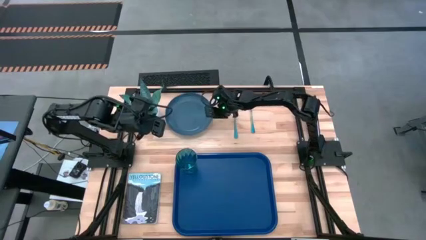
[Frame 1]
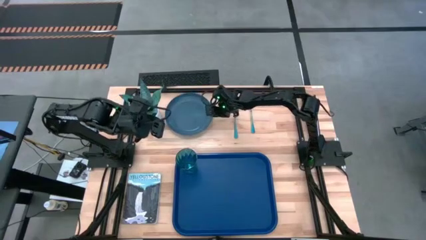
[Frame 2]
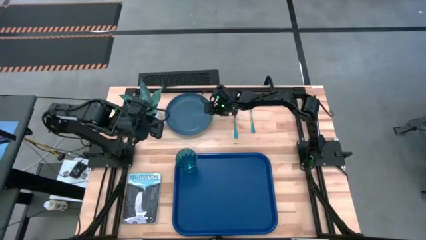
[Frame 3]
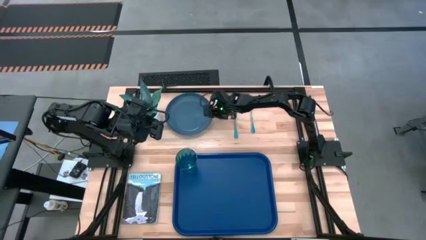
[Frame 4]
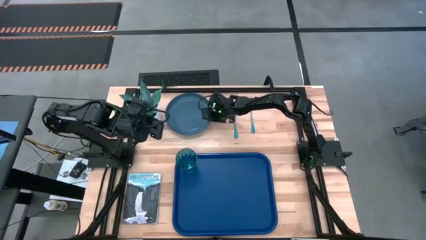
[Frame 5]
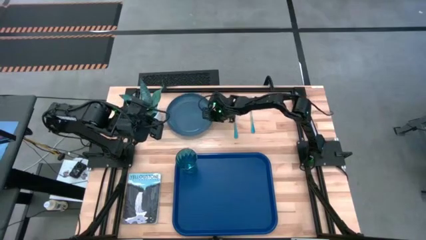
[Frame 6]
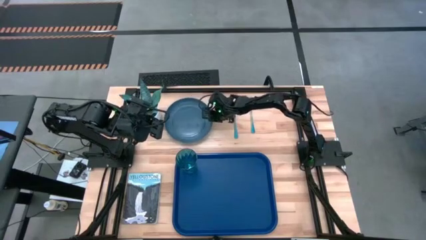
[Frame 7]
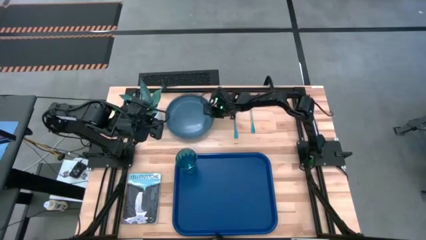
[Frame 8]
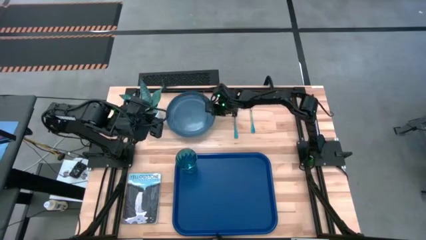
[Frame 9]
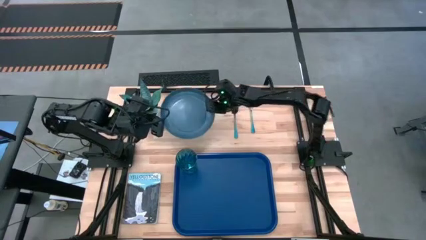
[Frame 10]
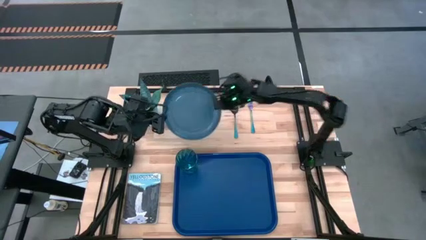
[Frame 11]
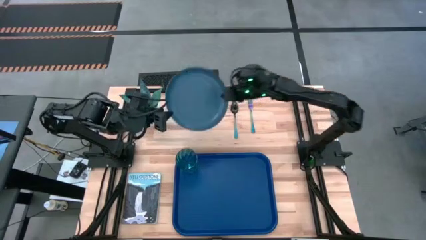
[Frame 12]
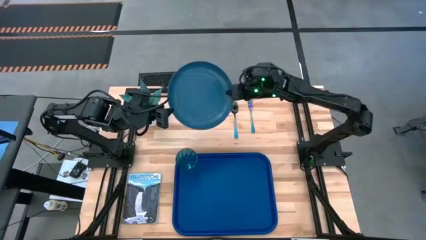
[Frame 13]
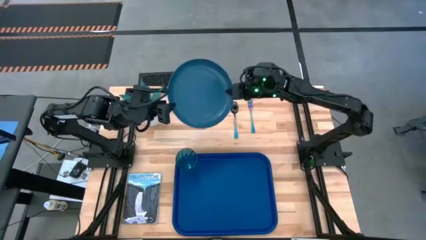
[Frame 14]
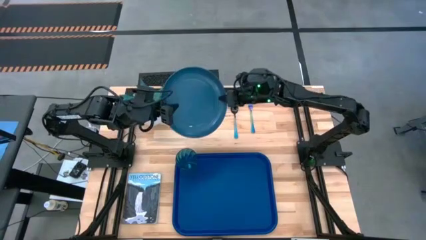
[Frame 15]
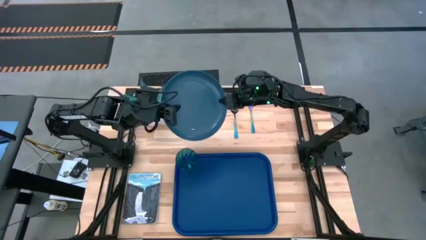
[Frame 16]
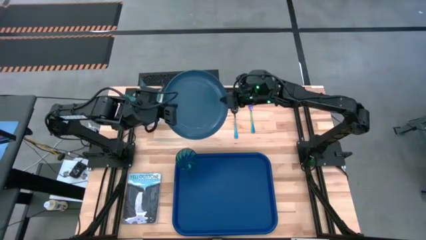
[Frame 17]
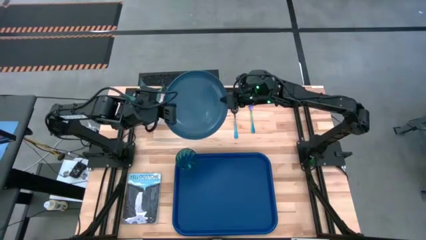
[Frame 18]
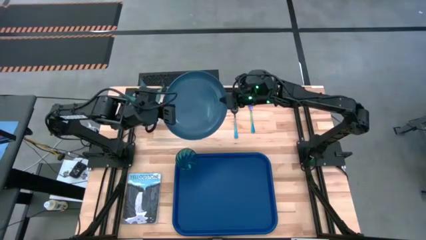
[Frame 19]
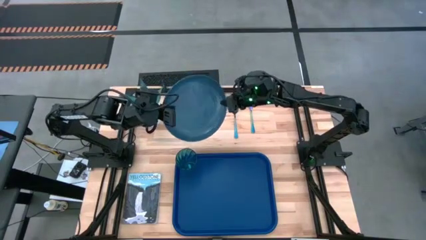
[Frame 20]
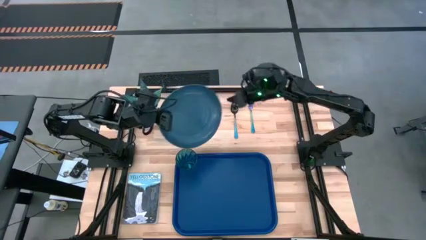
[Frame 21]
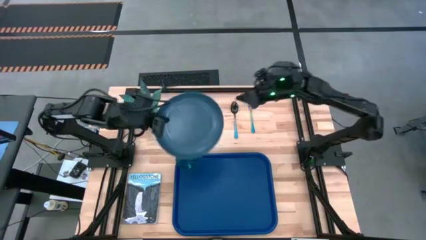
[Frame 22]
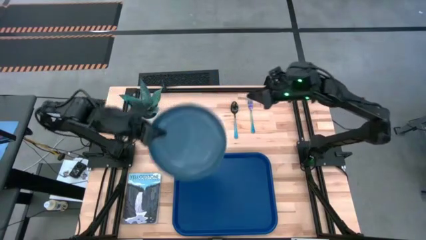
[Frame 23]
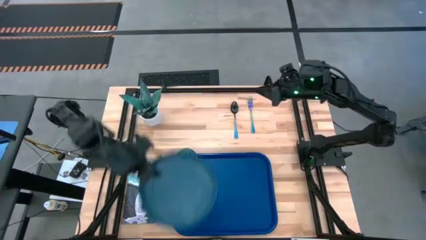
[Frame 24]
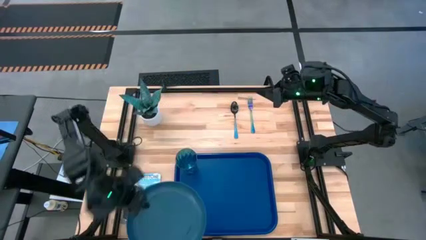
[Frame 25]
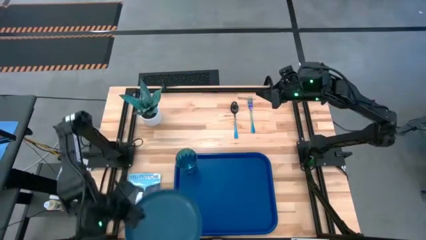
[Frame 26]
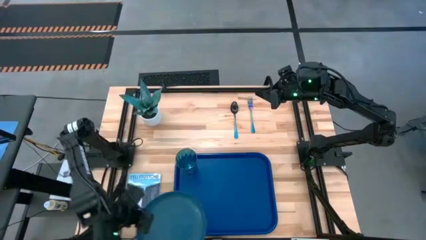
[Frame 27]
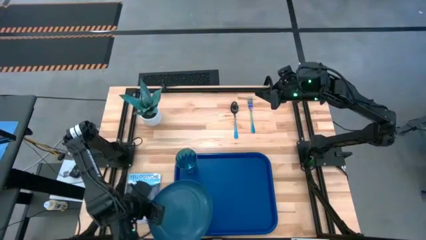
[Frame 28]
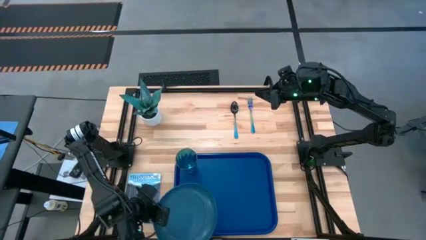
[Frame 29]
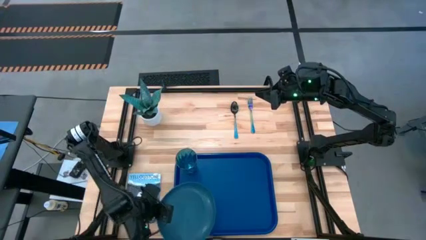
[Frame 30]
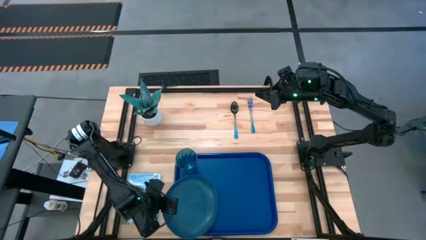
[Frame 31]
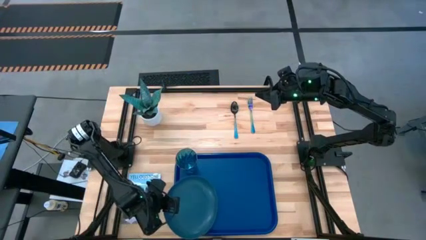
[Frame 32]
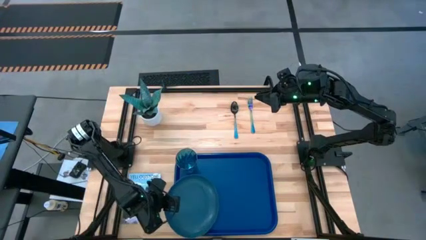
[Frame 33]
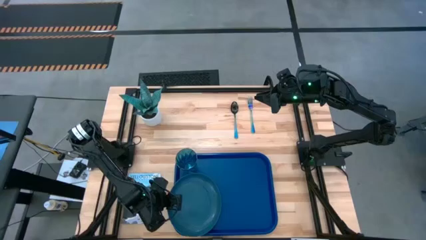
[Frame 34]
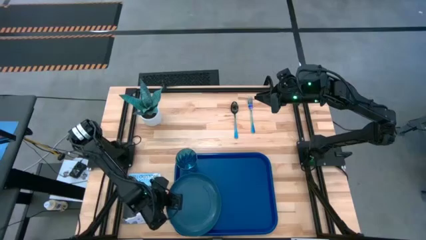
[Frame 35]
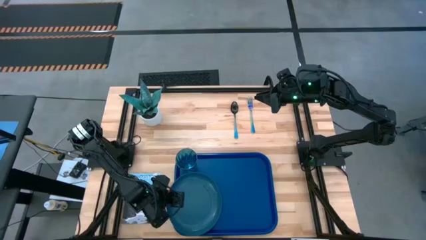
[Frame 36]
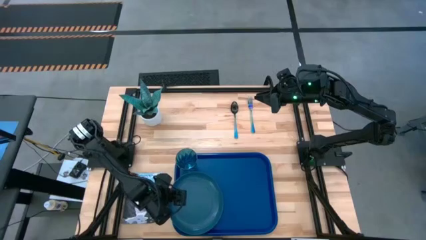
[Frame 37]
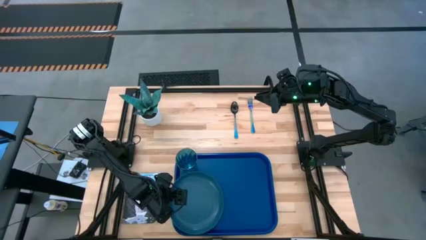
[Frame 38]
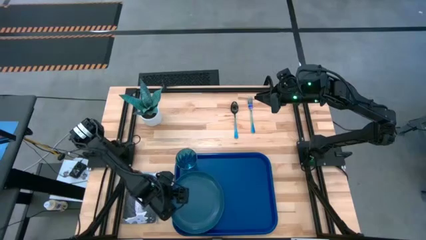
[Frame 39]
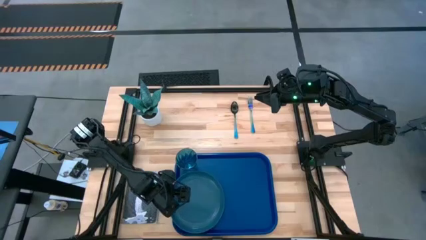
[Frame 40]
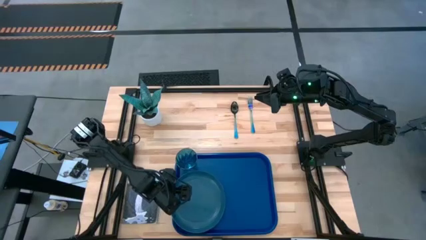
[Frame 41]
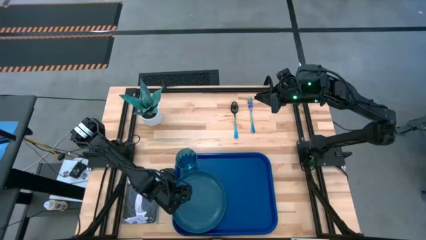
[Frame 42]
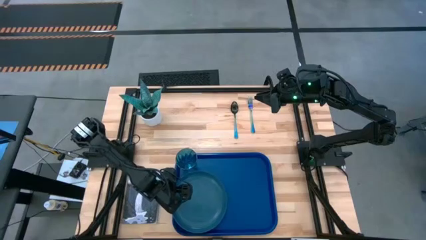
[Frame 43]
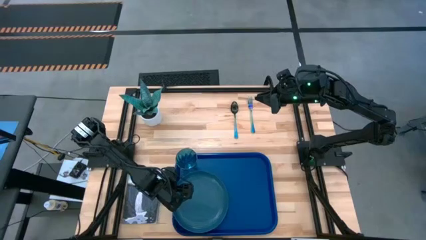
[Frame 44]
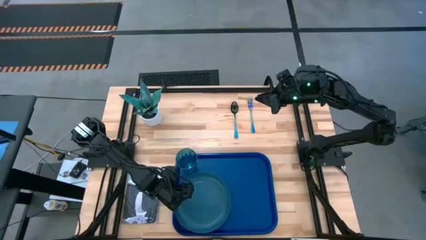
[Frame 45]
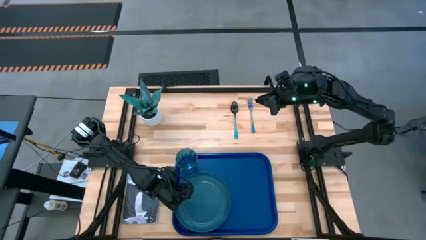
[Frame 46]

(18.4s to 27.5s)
Task: Pick and place plate/cup/fork/spoon on tray
Put the dark blue plate on the blue serving tray to the bottom right of the blue glass

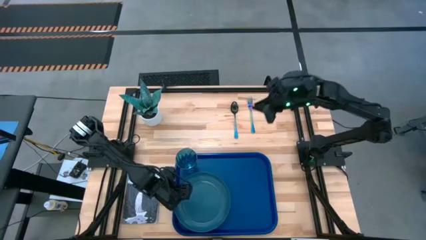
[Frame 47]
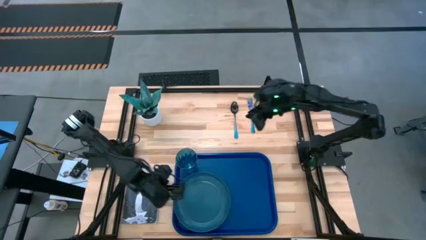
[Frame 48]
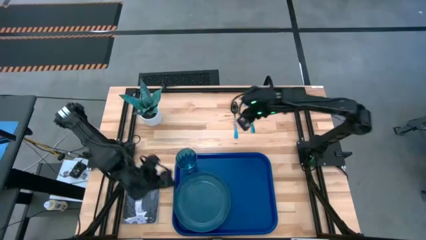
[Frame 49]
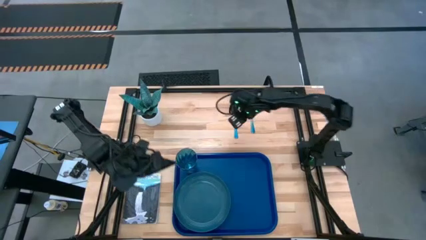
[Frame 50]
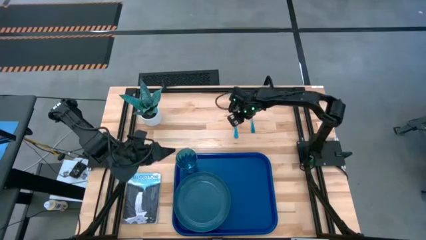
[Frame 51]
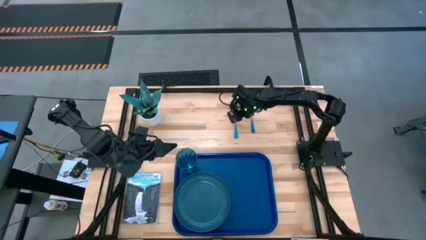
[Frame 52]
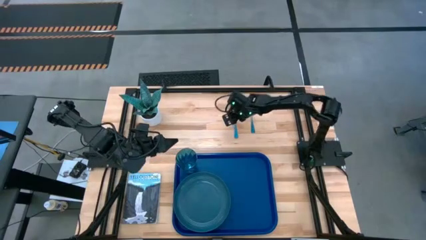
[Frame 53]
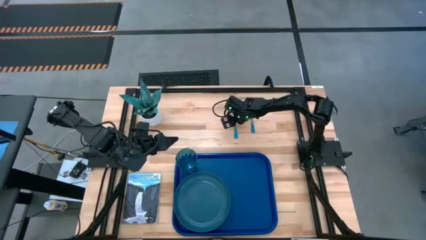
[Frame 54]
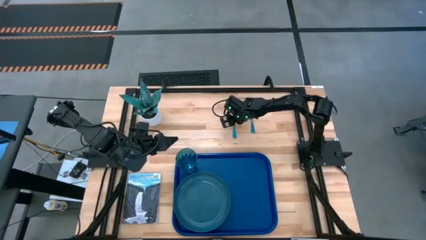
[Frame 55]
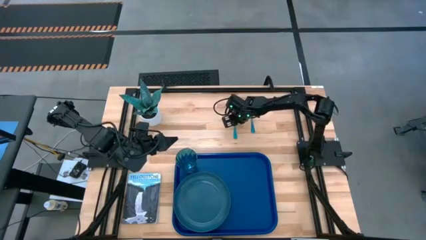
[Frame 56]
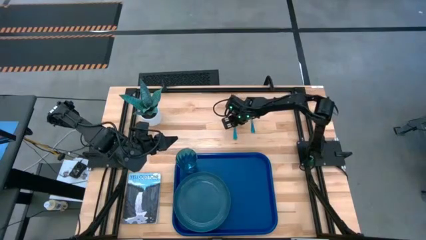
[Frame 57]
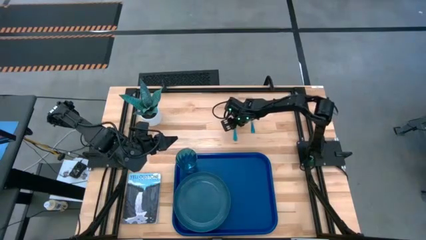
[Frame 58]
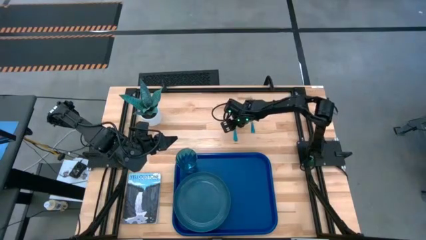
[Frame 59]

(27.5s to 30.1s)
Put the blue spoon on the blue serving tray to the right of the dark blue plate
